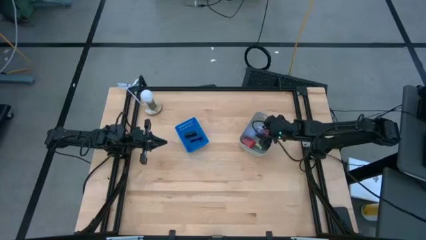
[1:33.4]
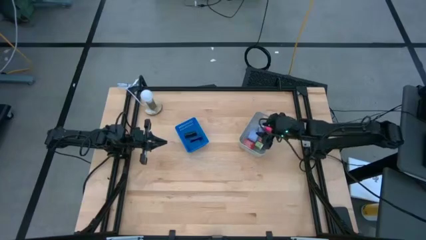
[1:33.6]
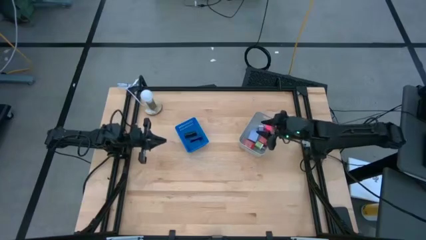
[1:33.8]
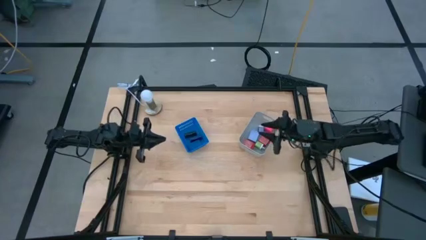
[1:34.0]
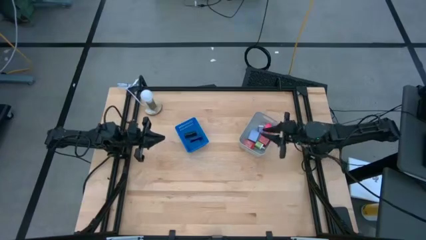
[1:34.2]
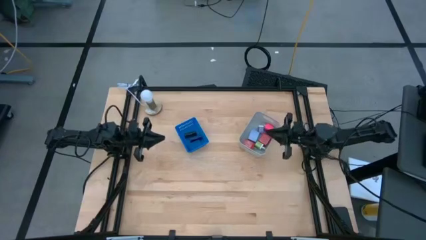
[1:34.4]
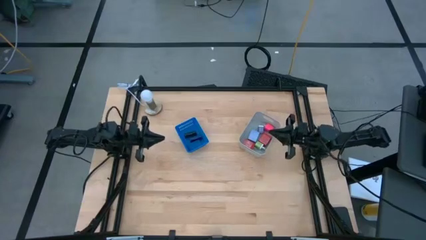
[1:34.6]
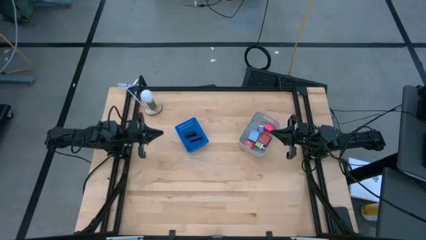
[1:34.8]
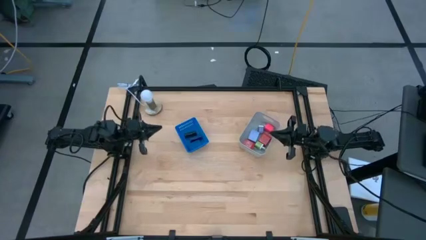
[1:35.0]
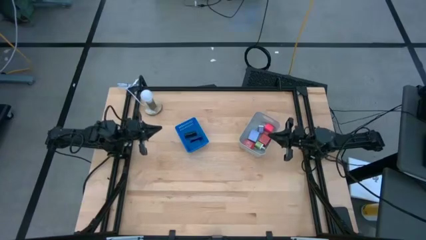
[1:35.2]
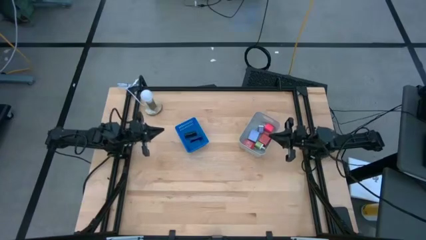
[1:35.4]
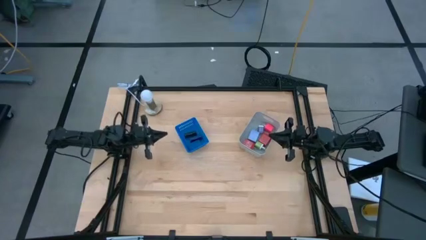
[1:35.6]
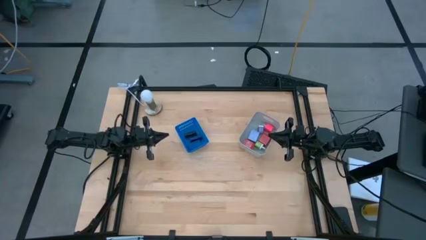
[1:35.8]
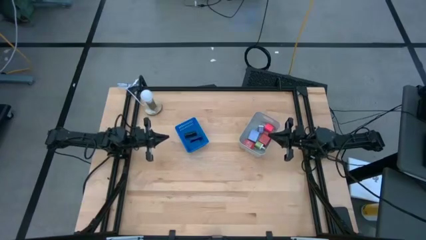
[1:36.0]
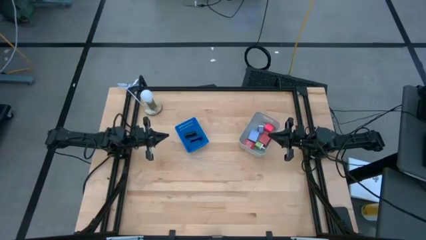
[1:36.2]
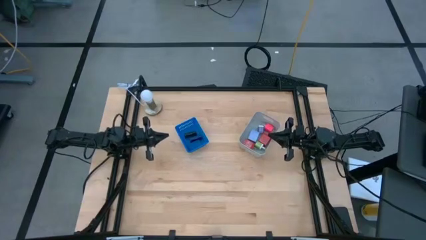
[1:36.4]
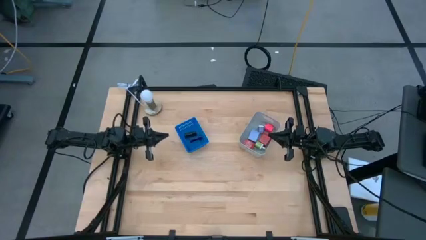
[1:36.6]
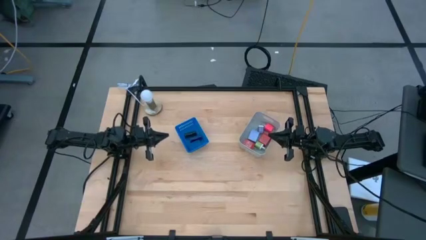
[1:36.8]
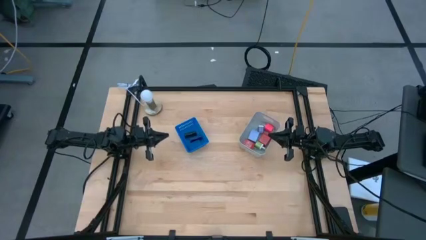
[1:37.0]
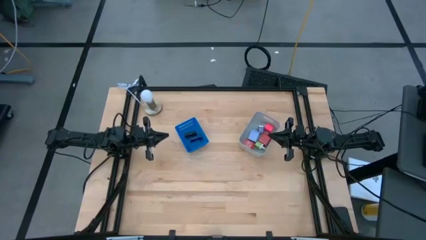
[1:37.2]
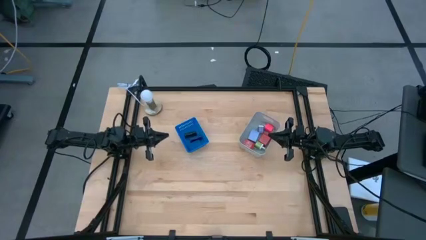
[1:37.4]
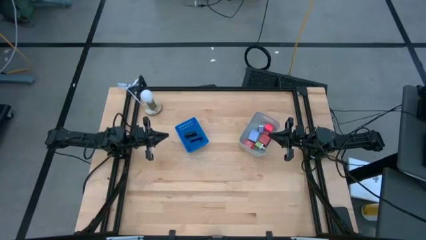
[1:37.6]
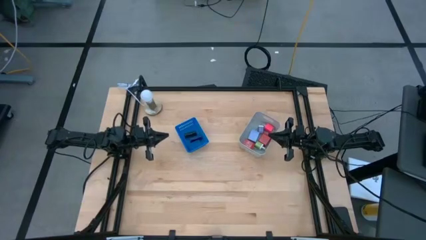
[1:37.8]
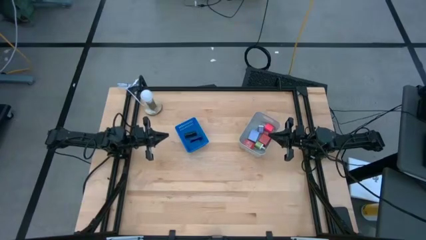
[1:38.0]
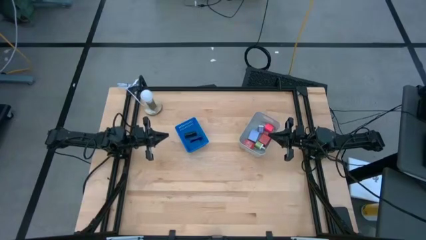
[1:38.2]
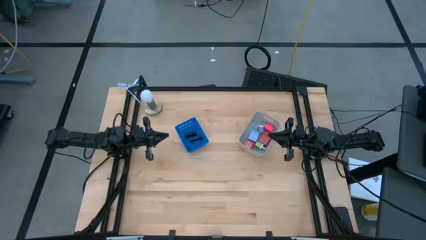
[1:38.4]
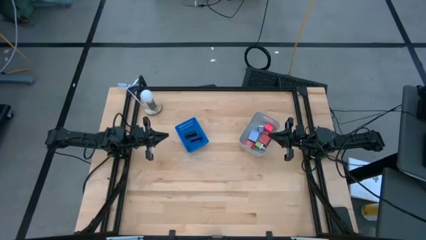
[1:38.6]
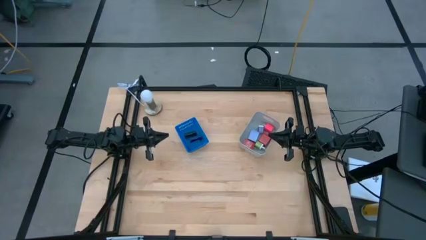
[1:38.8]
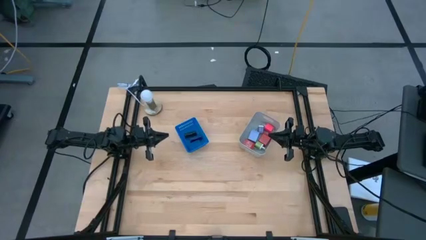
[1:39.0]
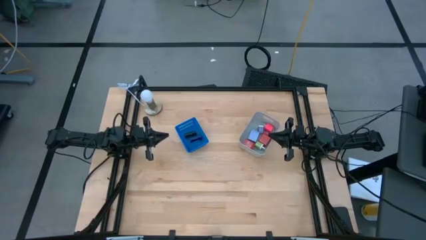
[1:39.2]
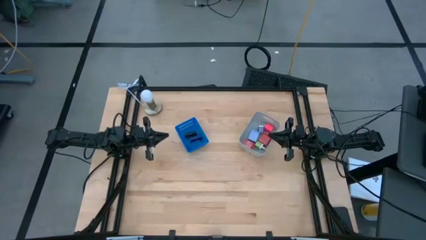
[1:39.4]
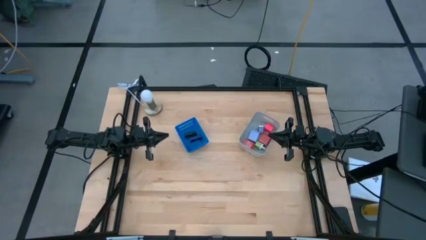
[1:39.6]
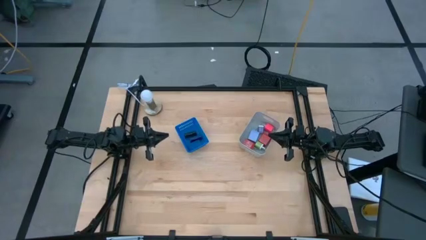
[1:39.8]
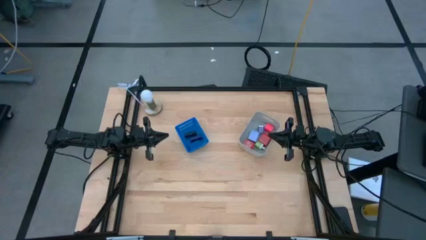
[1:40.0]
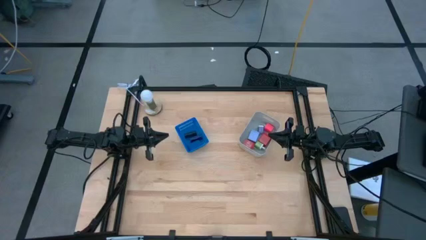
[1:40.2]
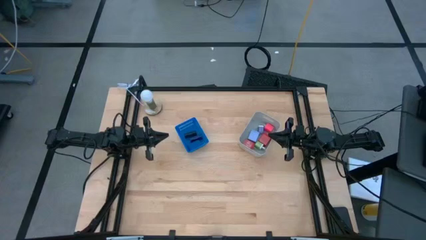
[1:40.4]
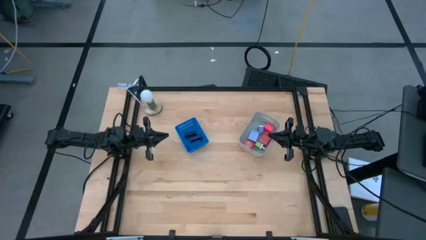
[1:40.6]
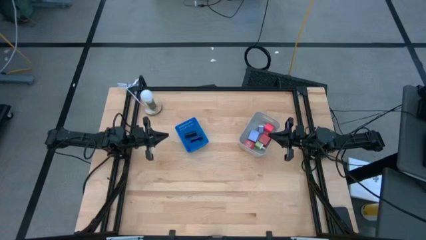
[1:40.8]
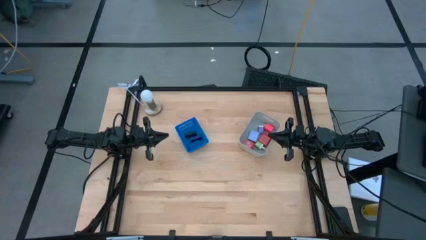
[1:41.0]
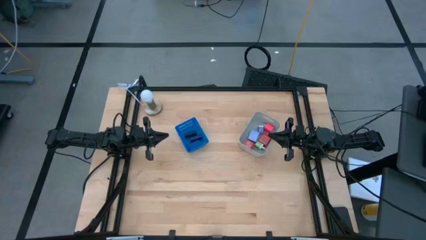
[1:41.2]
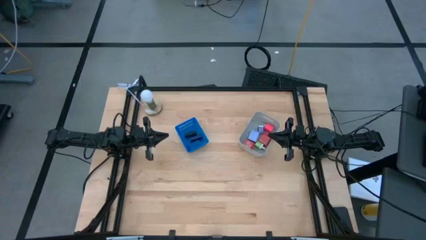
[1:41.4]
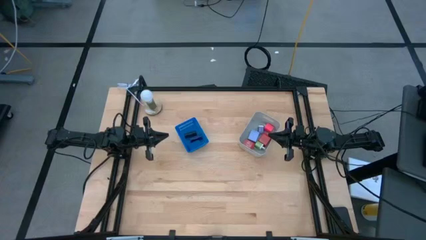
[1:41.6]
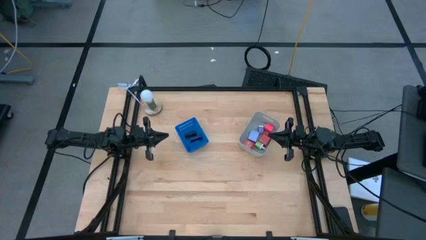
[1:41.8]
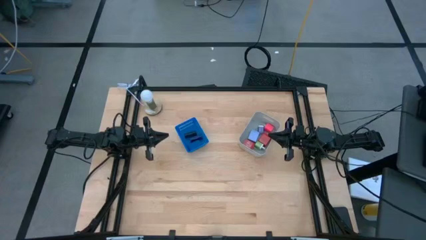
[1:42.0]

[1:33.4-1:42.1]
Task: Pick & Place Office items
Return to Home Position

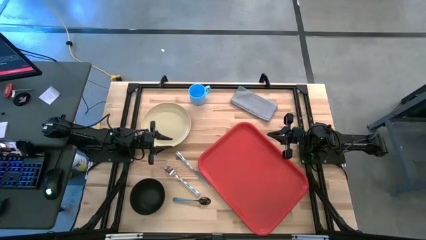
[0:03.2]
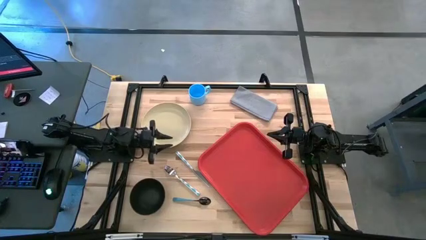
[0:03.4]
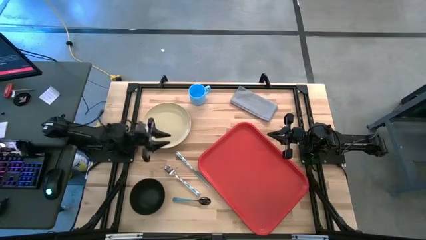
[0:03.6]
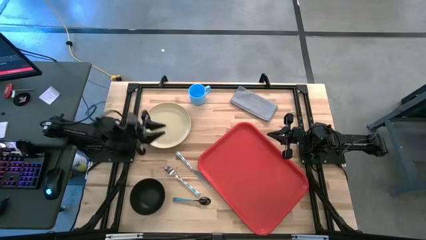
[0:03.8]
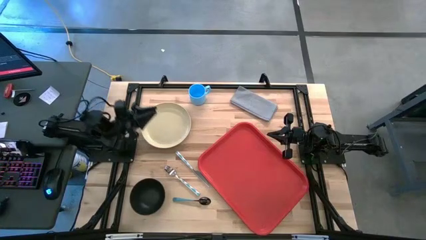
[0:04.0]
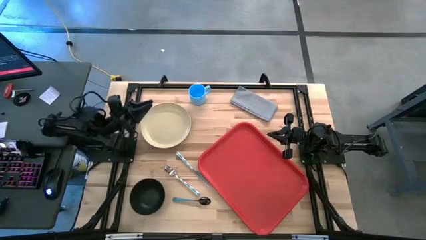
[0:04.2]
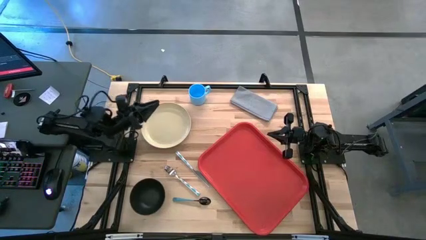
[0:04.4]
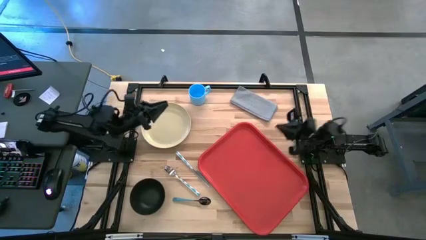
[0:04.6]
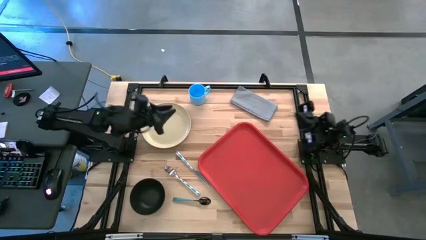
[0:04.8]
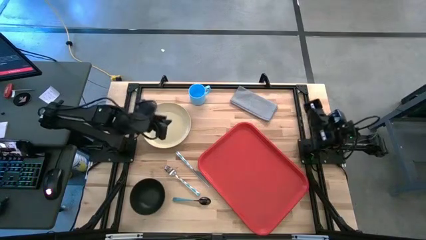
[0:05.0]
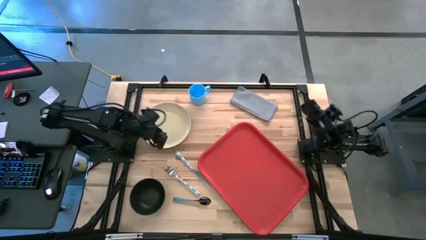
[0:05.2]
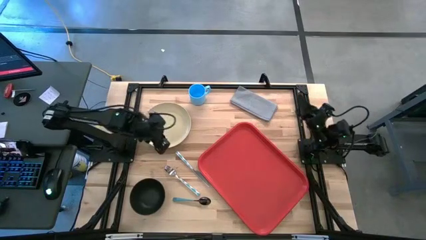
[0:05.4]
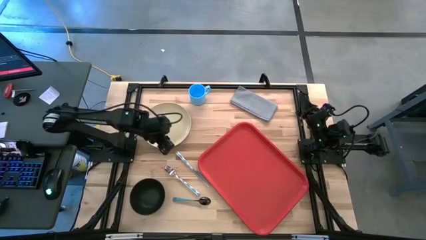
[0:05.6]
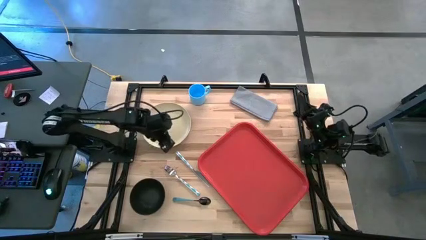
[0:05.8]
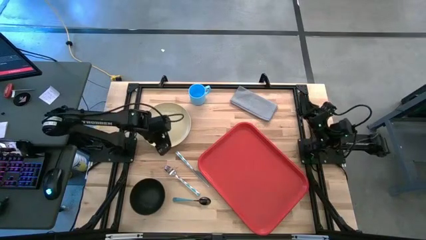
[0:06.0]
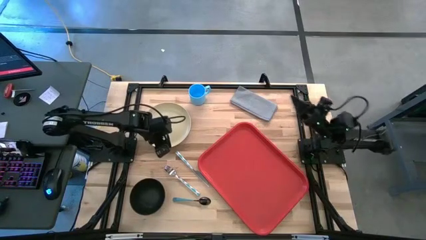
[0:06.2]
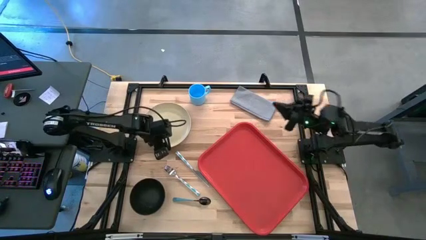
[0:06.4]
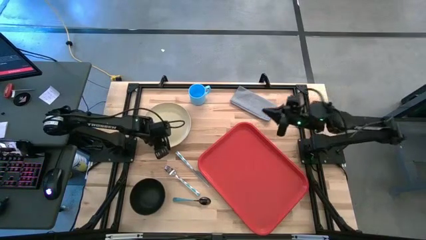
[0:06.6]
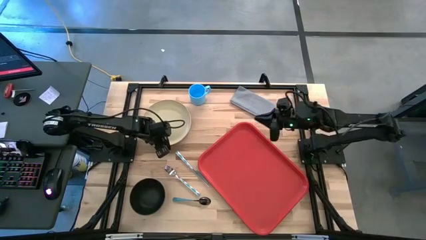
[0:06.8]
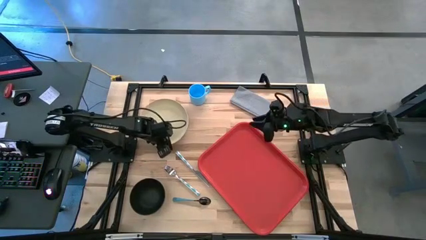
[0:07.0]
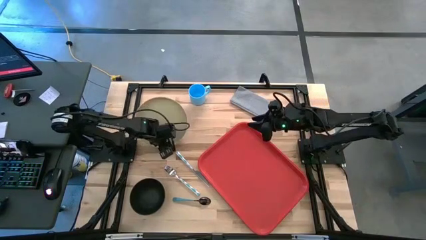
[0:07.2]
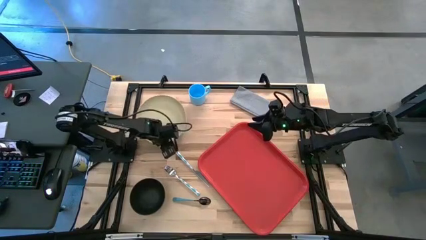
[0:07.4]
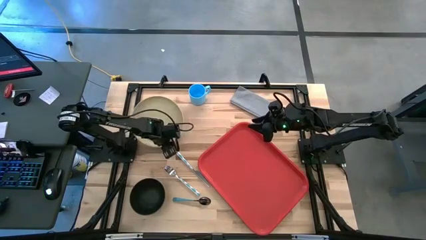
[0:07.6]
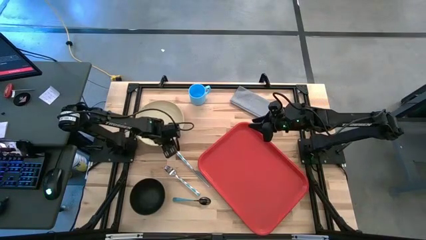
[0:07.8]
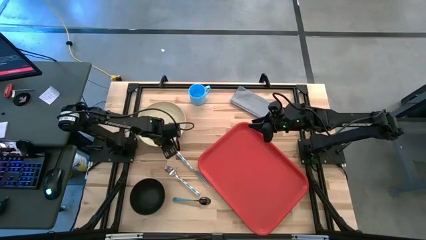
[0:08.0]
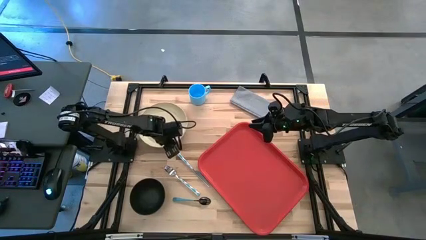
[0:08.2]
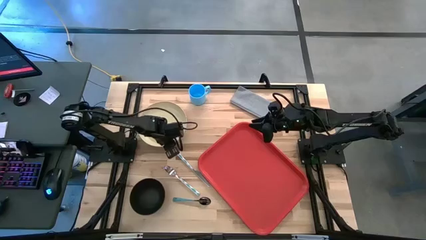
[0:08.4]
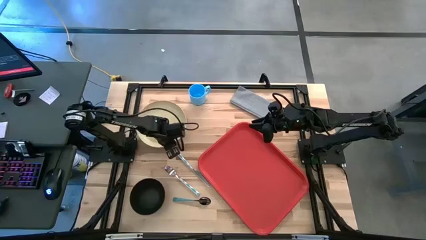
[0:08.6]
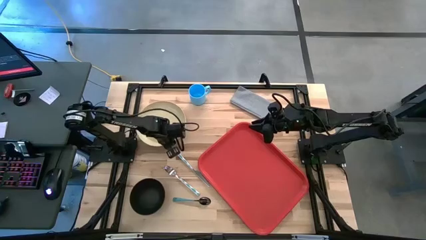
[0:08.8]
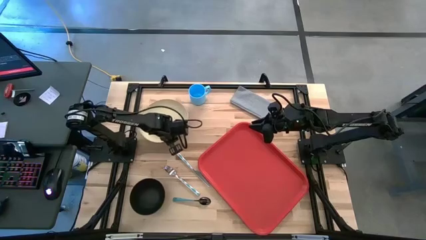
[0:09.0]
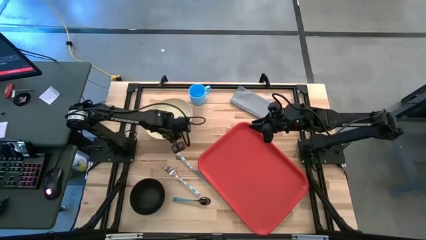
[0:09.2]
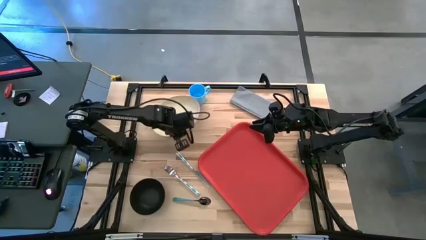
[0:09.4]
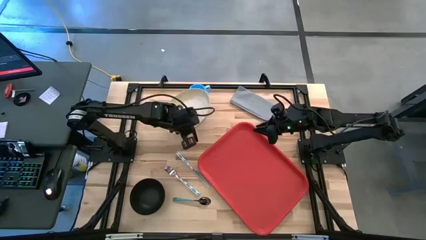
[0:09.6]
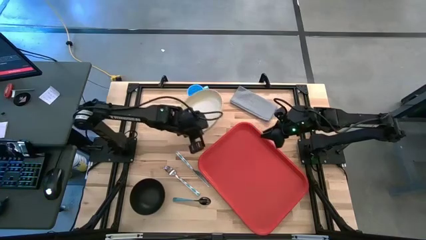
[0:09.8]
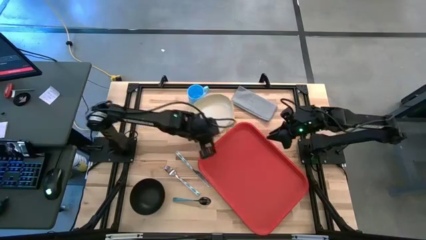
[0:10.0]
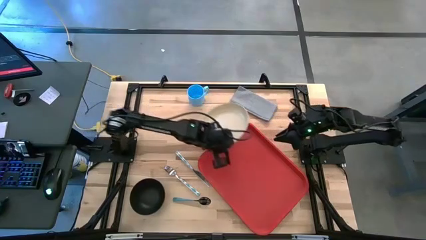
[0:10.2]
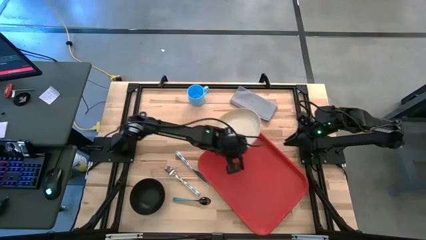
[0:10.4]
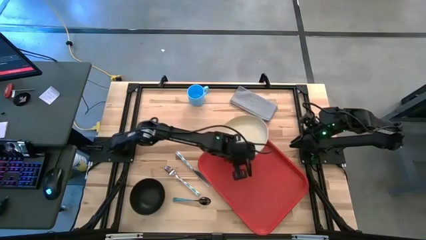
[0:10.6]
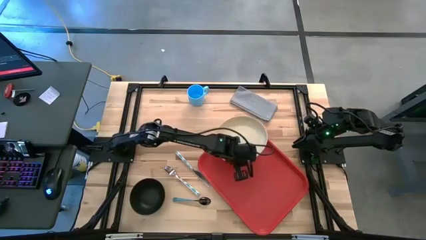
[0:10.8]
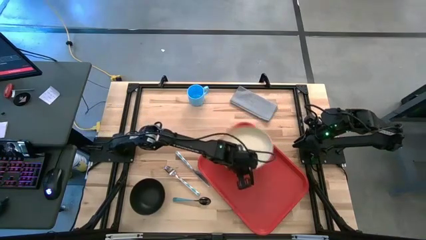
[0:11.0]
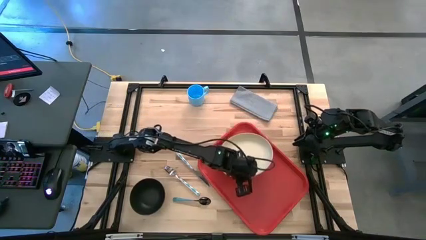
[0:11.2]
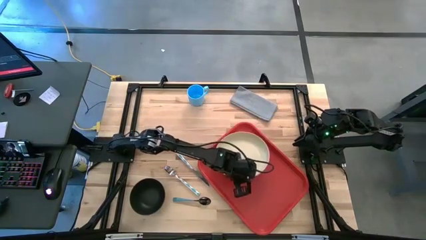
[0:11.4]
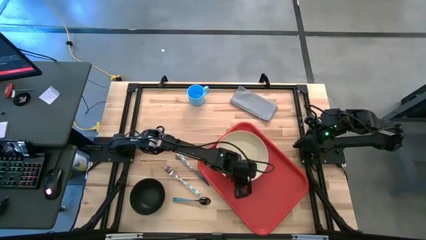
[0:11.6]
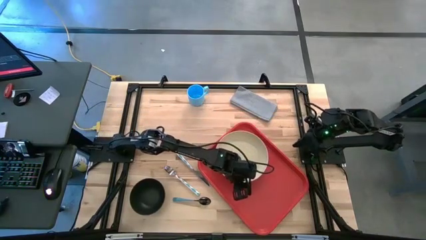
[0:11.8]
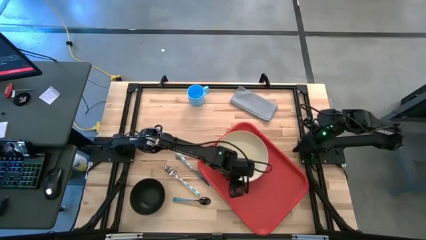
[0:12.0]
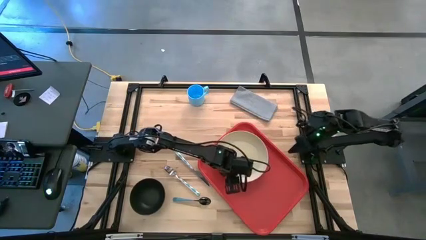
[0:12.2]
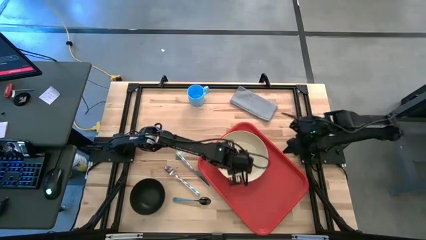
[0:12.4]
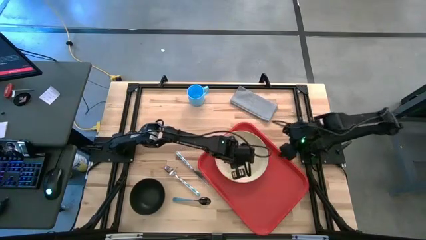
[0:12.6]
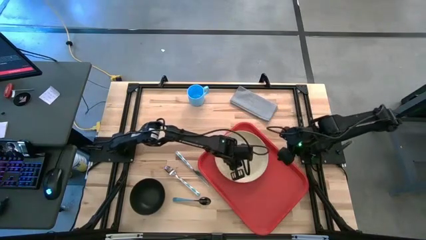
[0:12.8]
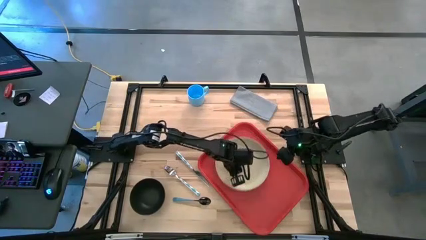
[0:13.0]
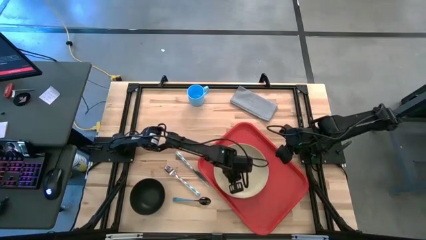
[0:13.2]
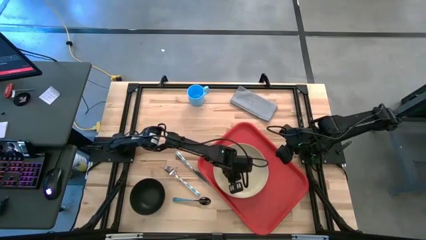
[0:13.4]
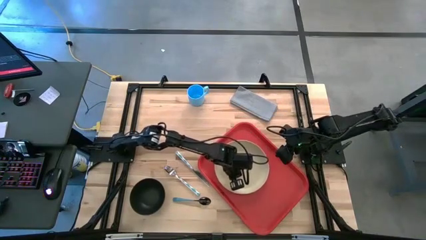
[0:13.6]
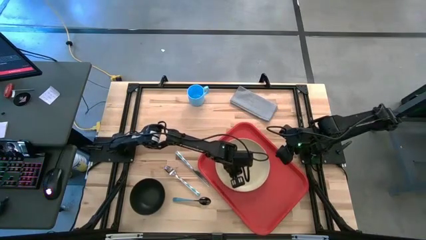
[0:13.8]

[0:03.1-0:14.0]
Task: Set up tray
Put the brown plate on the red tray
